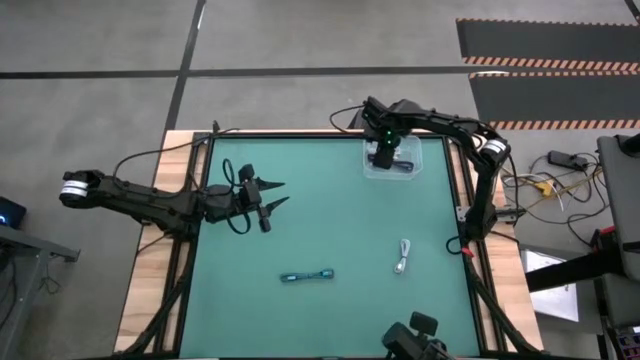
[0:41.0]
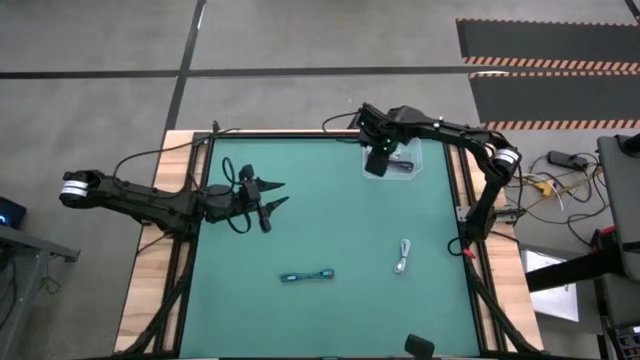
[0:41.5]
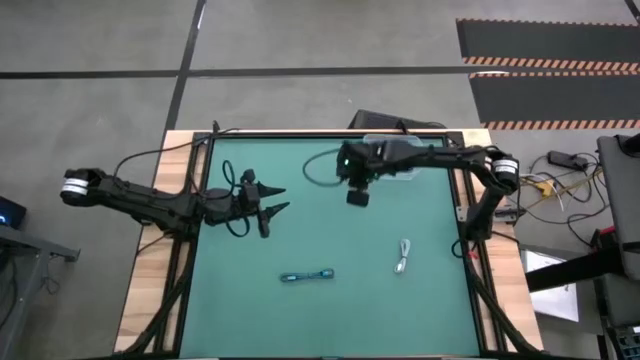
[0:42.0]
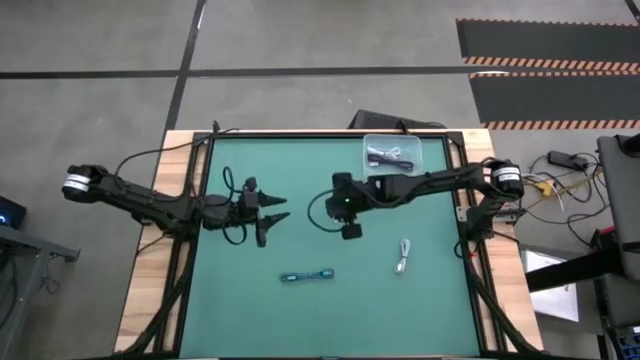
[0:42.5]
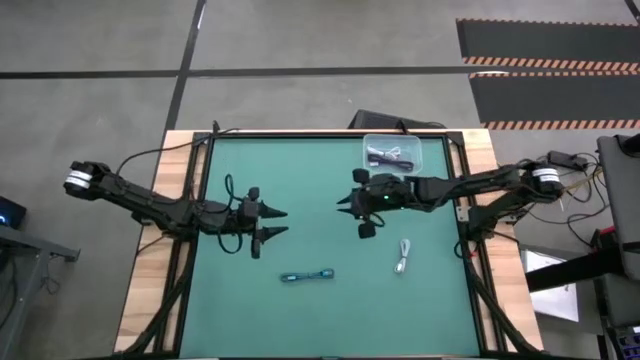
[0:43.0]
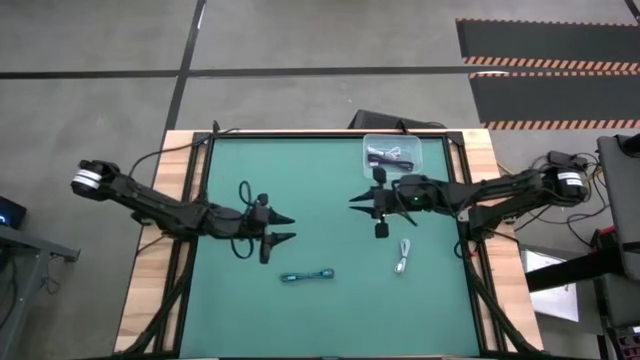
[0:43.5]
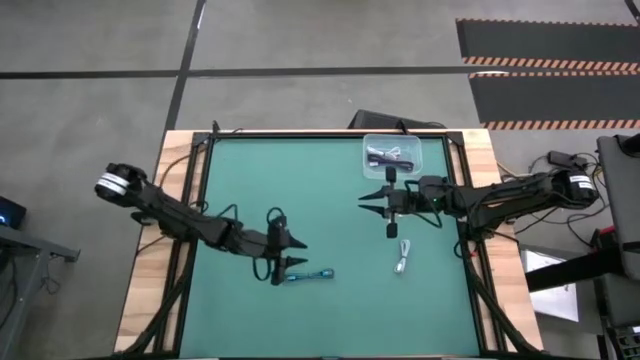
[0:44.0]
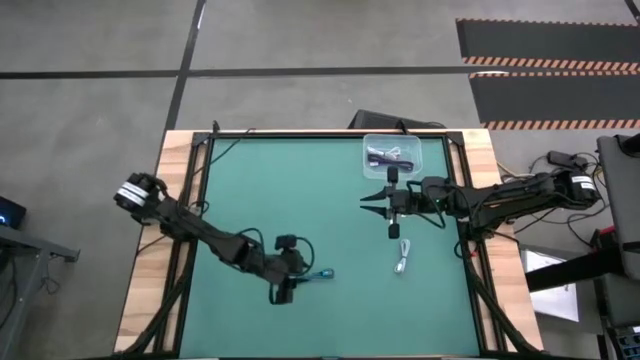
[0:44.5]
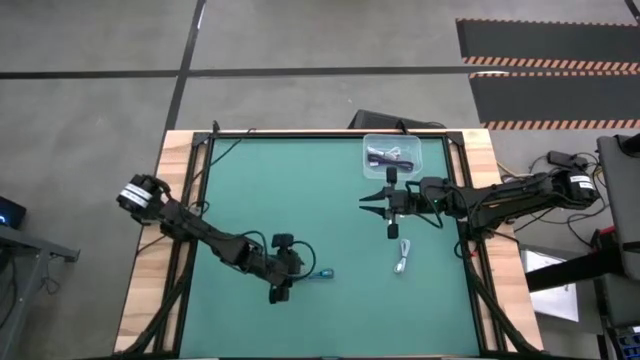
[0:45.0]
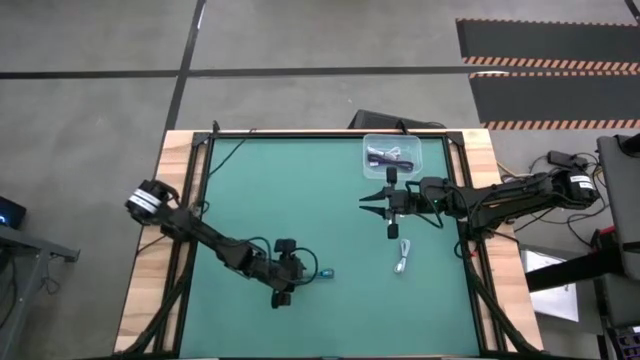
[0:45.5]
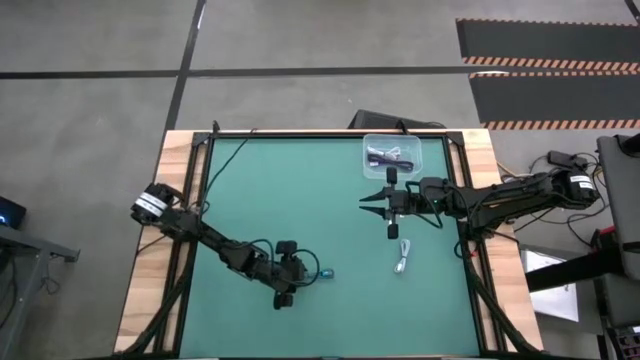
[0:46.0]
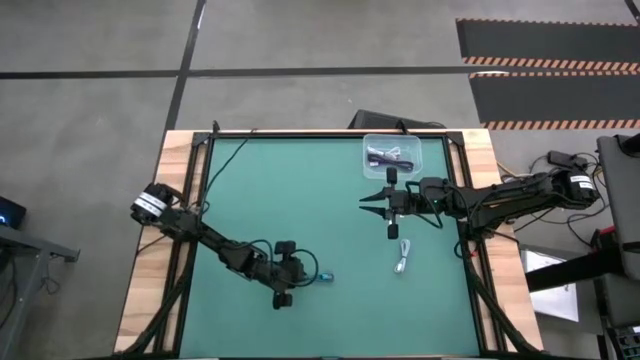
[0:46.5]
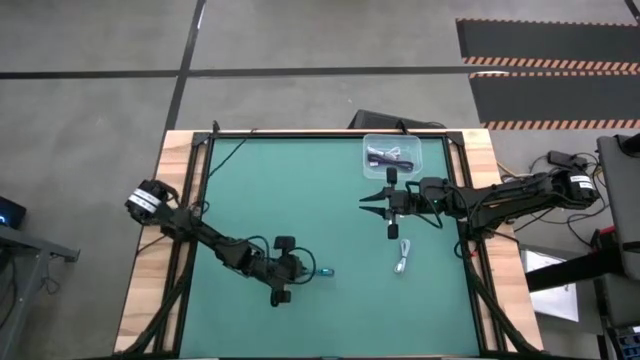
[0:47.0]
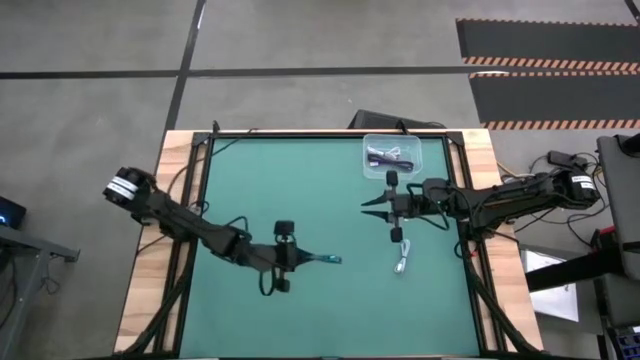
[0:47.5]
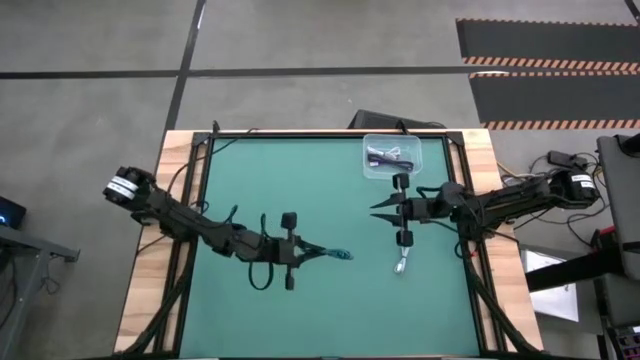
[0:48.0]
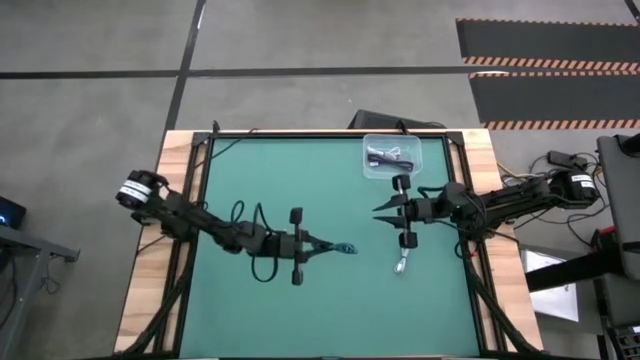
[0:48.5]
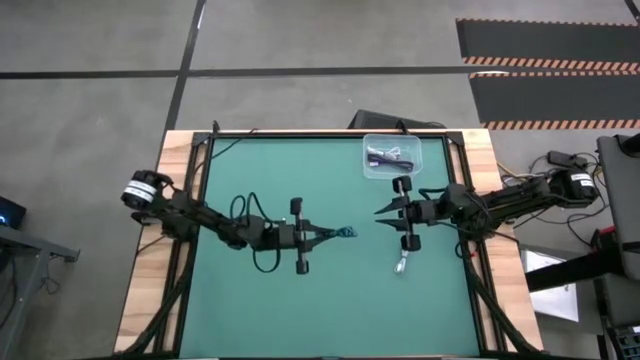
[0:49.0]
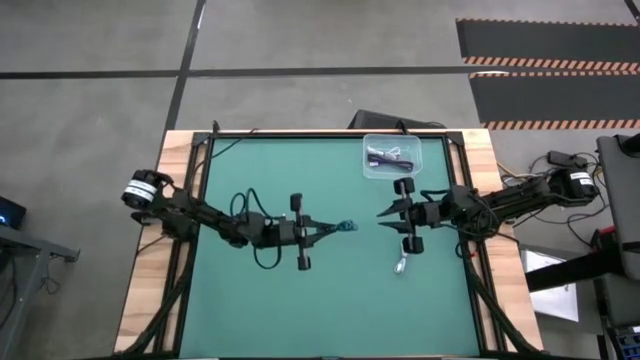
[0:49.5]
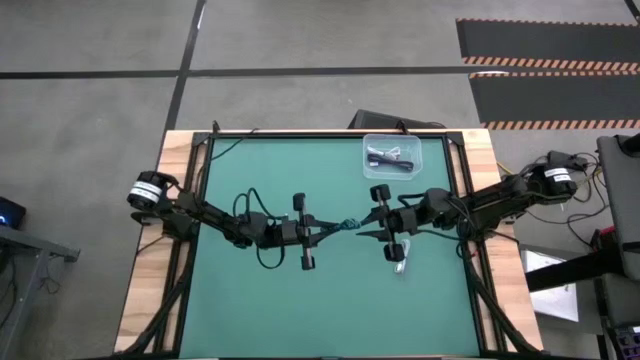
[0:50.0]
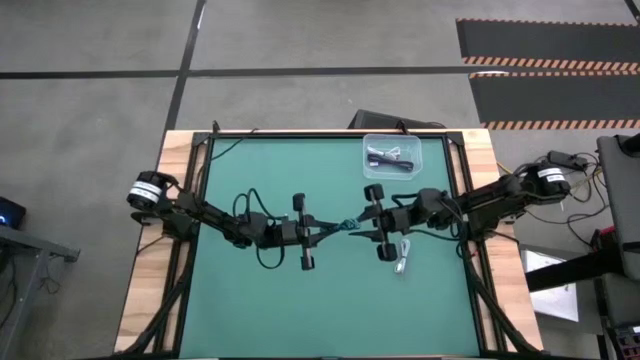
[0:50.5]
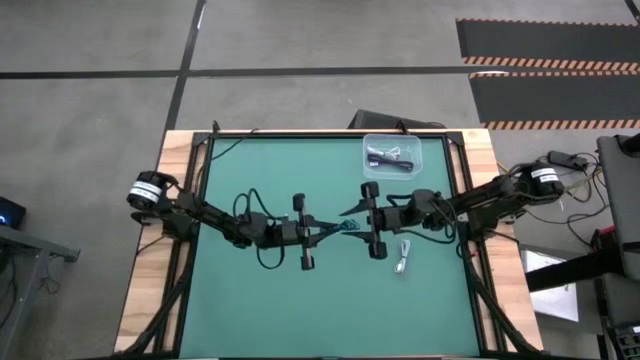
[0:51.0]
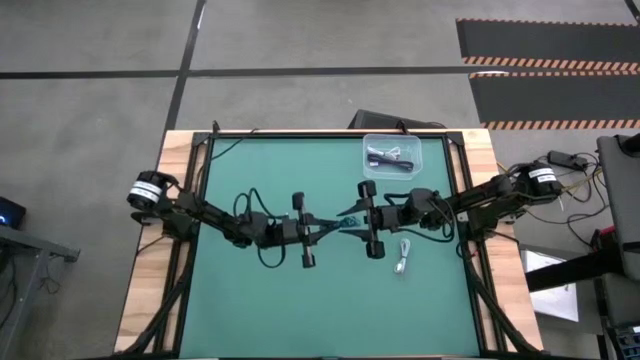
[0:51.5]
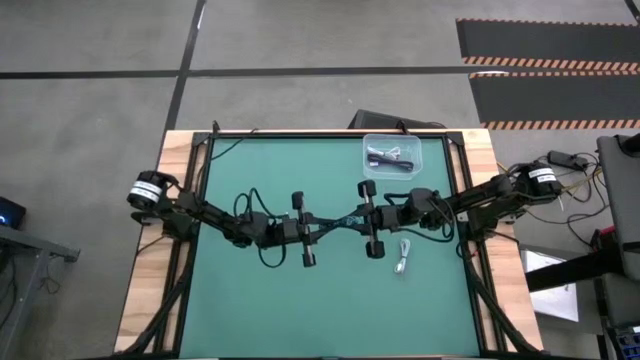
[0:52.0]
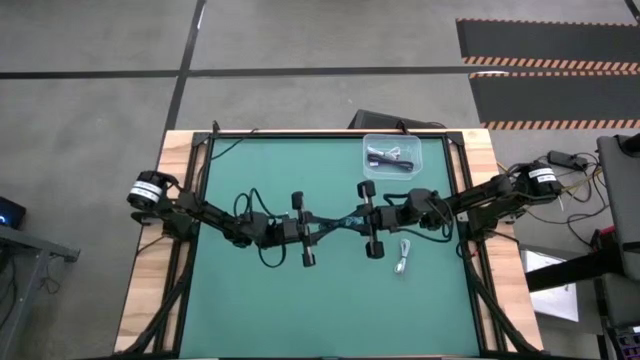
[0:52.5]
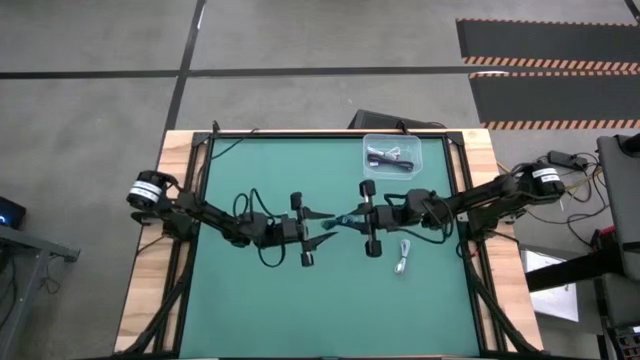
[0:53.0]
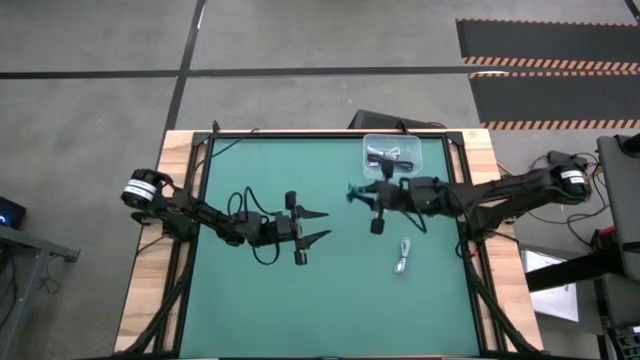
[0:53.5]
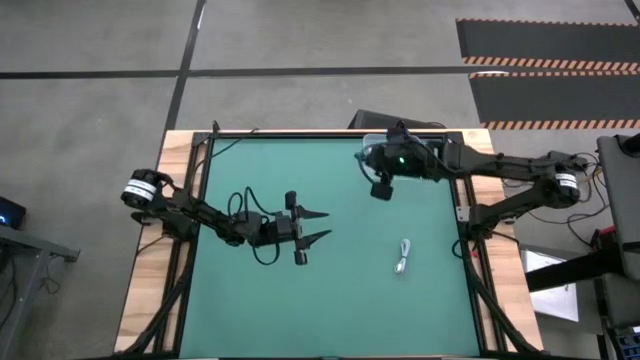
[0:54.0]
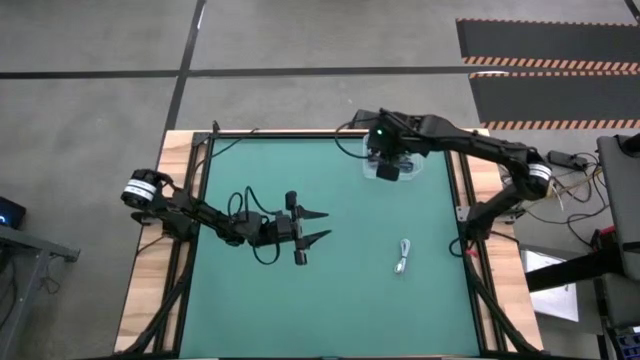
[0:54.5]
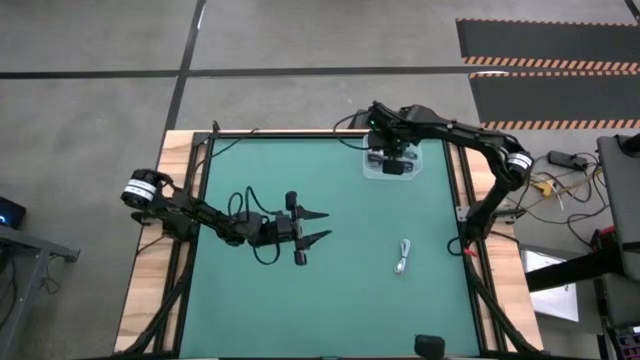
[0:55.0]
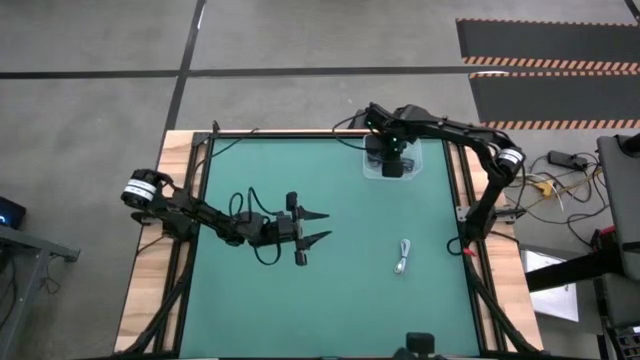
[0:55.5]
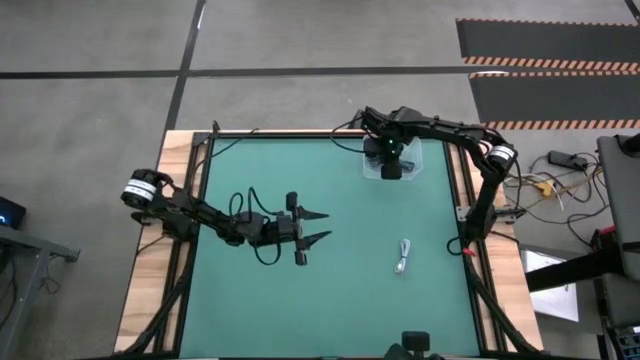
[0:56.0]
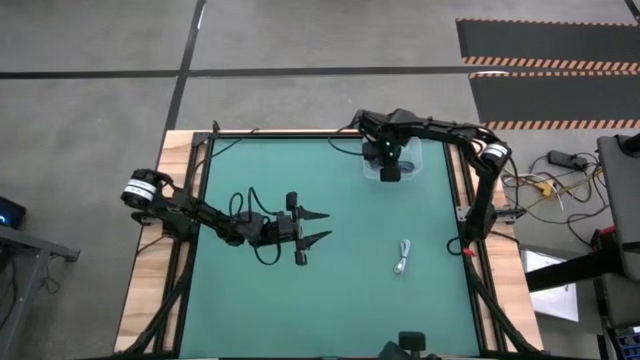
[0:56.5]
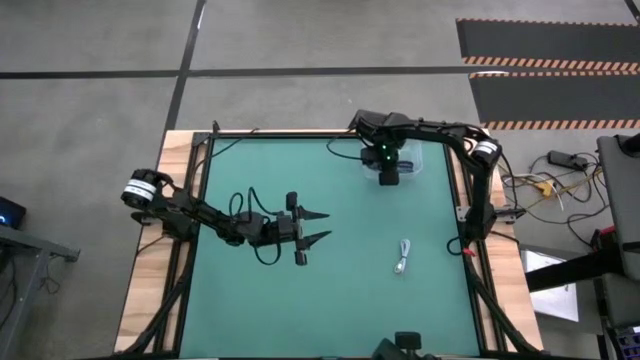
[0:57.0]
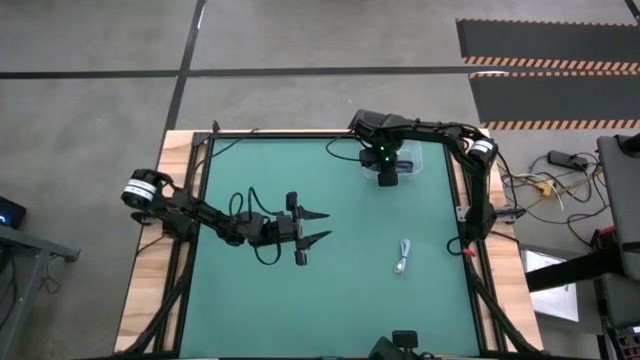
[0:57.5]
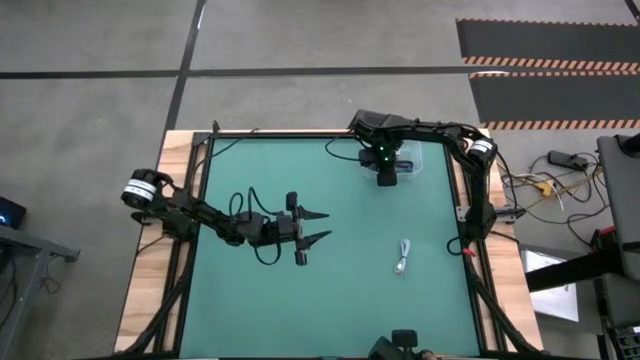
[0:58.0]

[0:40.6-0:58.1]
Task: Pick and place USB-C Cables
Put the blue charger cable into the transparent bin

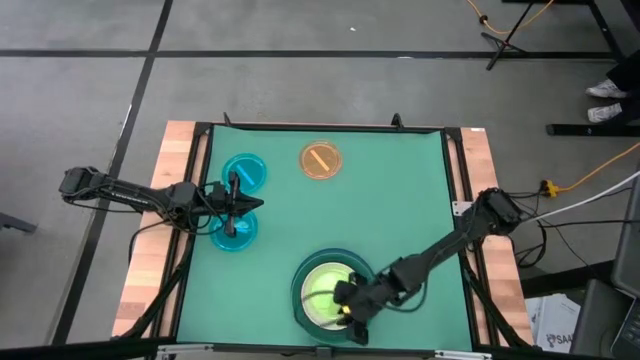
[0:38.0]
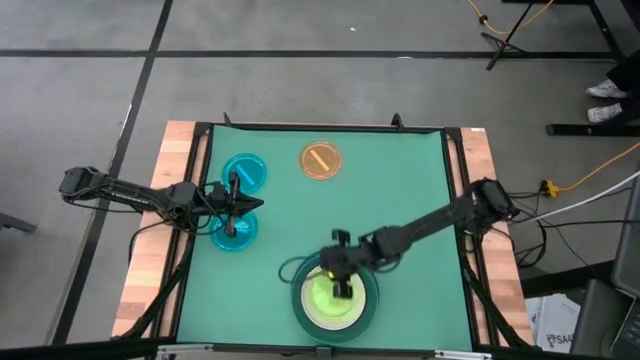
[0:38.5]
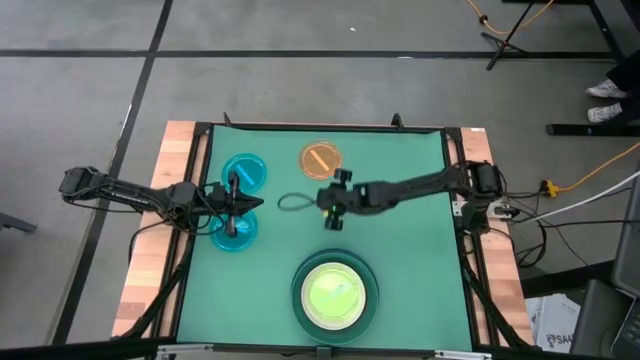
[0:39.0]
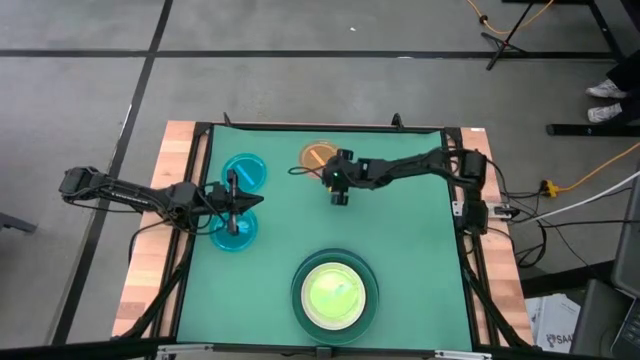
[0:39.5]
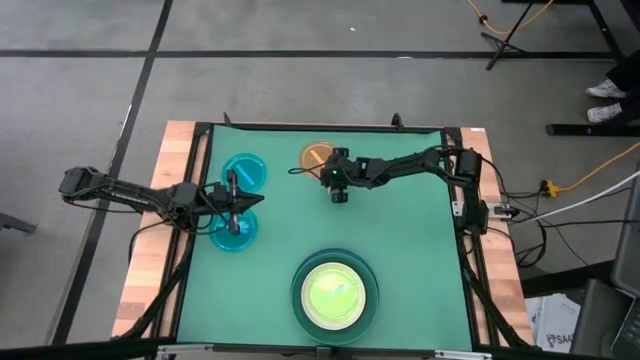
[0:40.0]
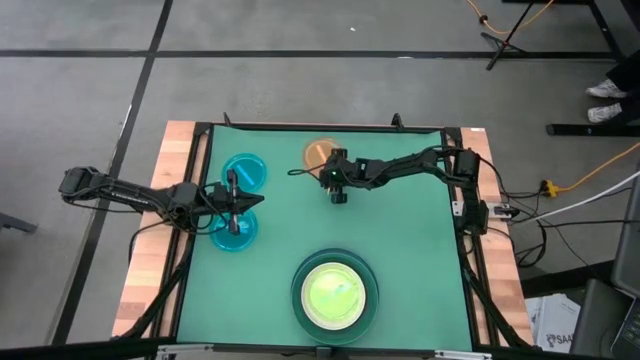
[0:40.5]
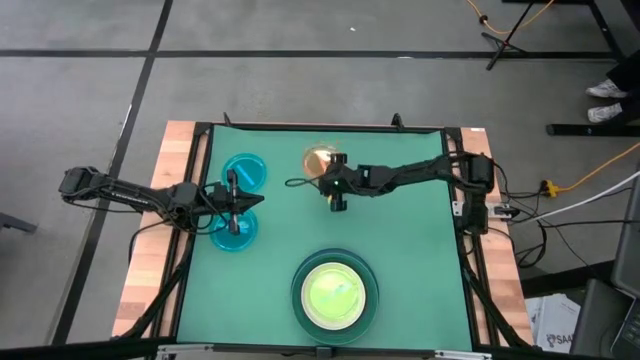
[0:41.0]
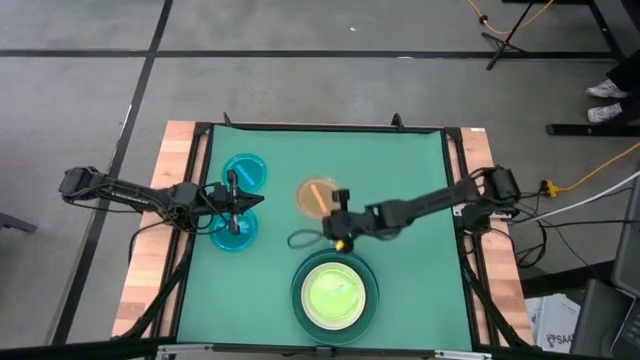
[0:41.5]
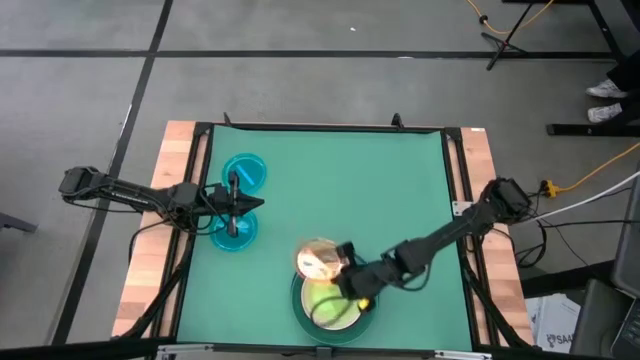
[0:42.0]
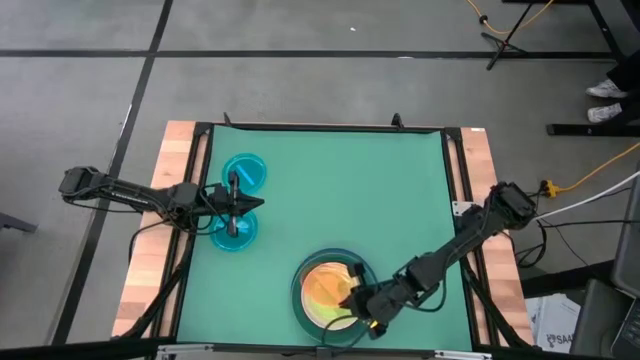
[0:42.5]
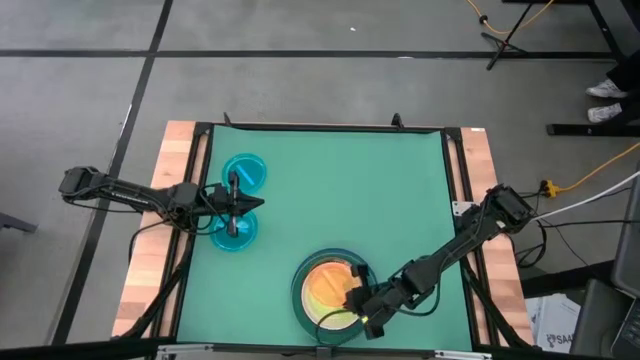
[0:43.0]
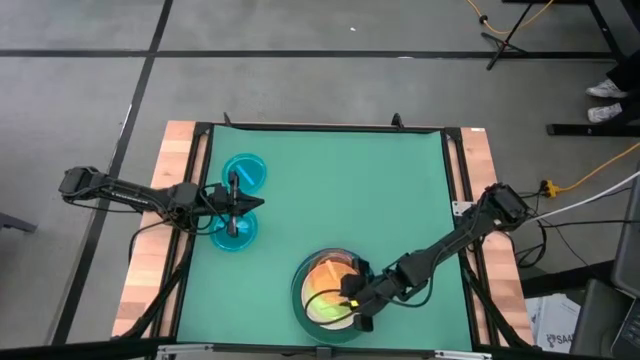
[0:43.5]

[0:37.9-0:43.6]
Task: Stack plastic plates
Stack the orange plate on top of the green plate
